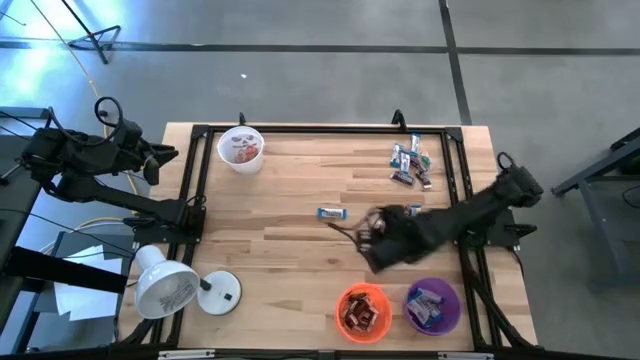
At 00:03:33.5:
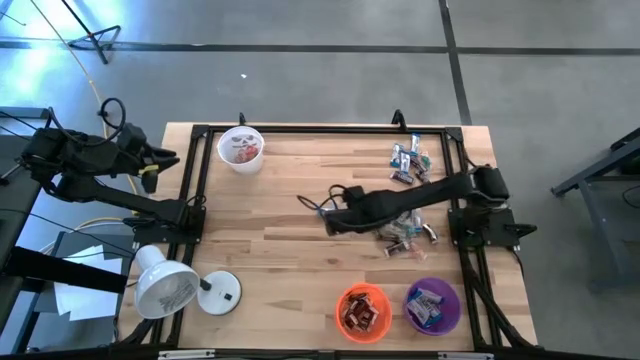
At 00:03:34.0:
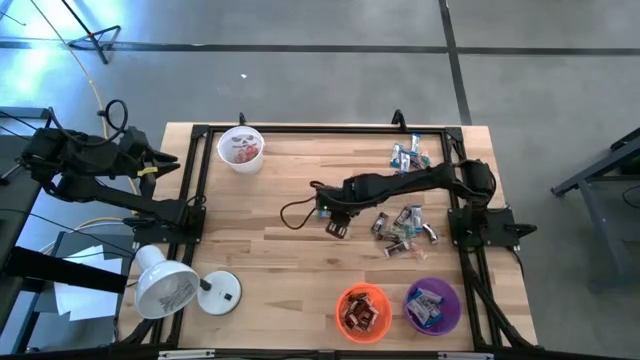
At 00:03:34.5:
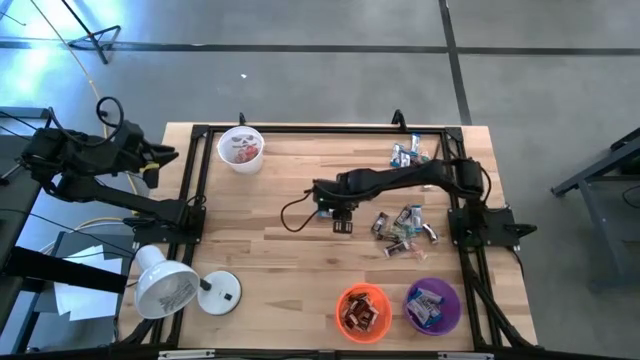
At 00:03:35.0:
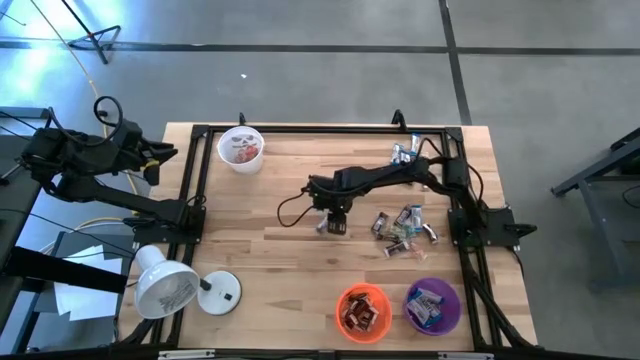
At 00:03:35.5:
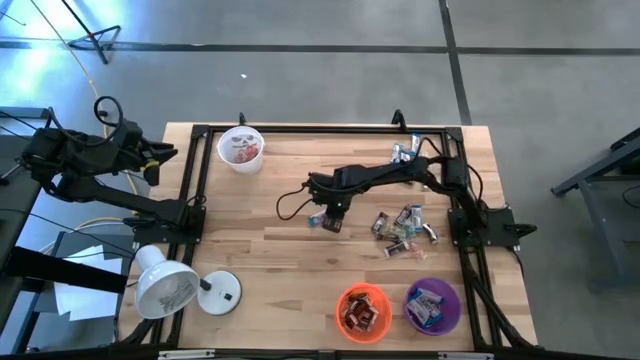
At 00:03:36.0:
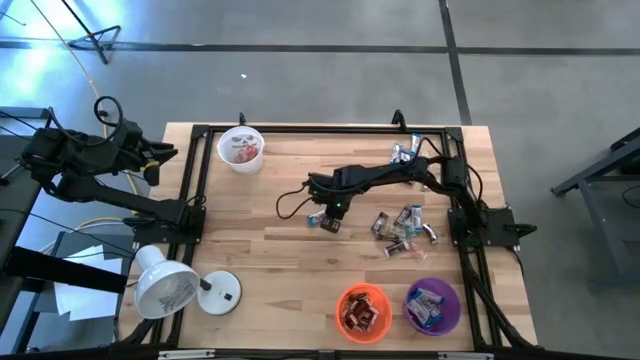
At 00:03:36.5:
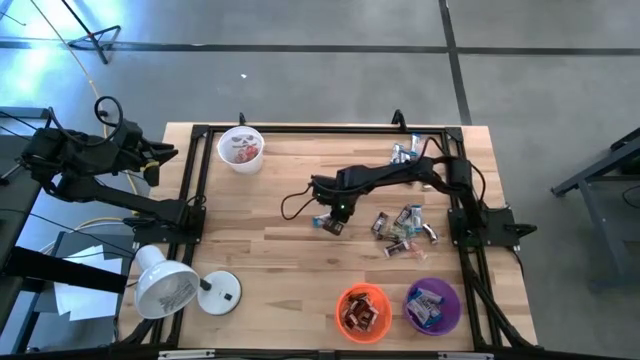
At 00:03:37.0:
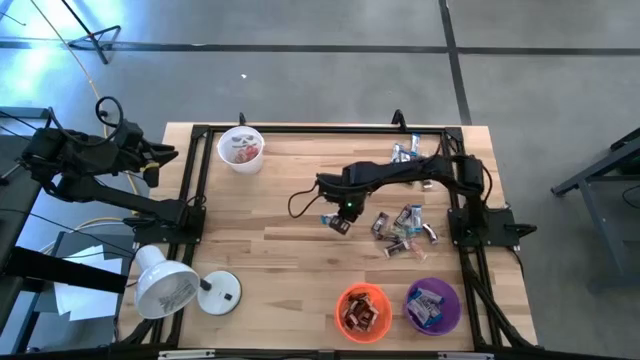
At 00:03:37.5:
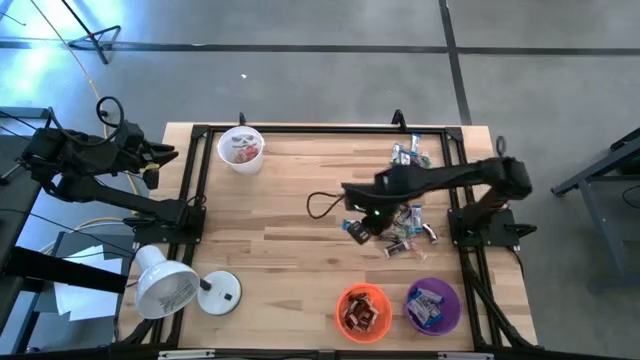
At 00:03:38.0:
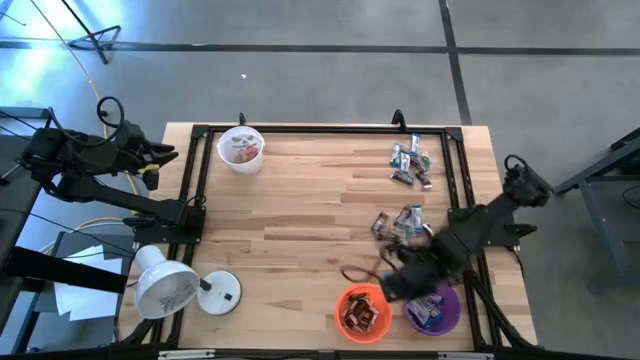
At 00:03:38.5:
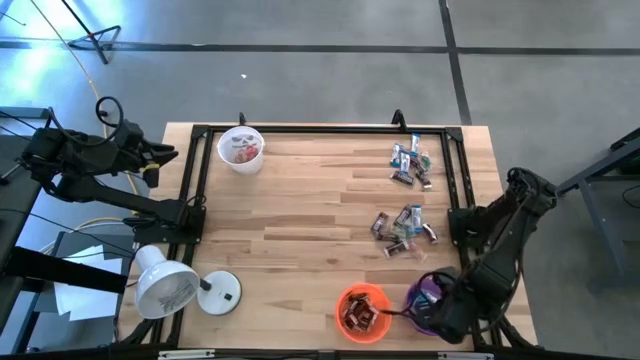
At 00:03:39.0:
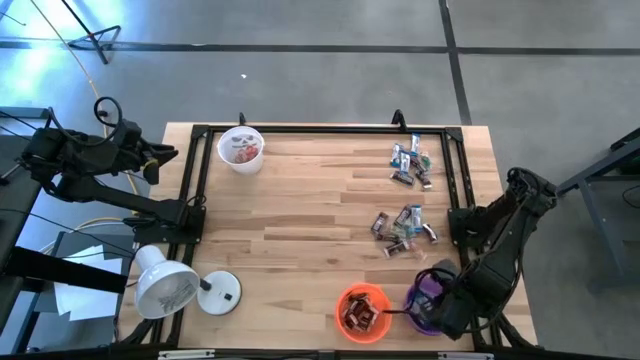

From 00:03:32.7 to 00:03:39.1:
Task: Organize candy in baskets
Put the white chocolate into the purple bucket

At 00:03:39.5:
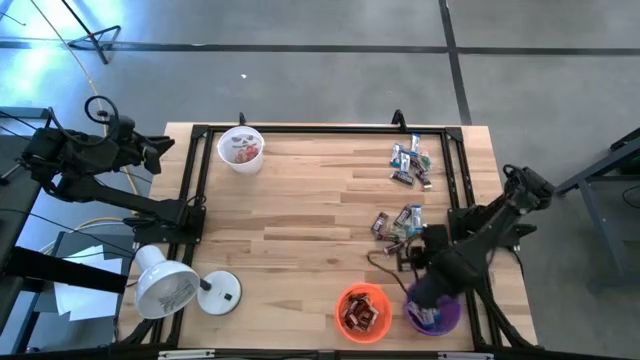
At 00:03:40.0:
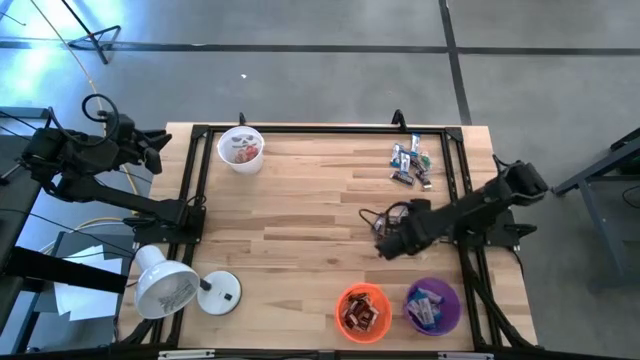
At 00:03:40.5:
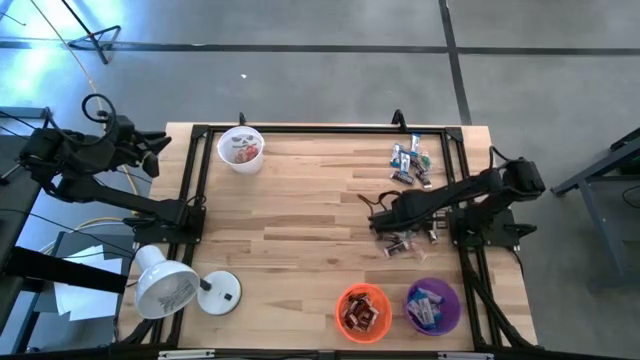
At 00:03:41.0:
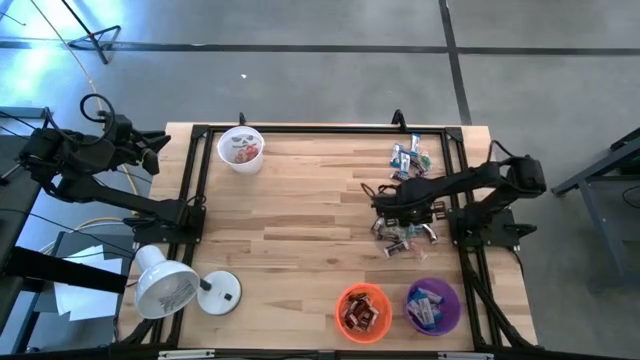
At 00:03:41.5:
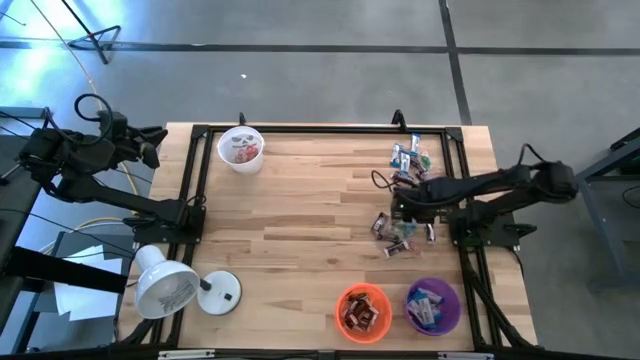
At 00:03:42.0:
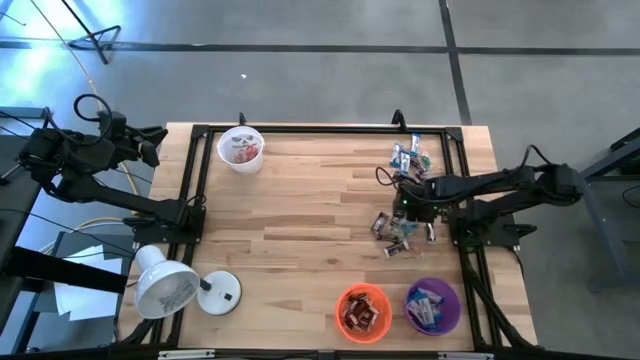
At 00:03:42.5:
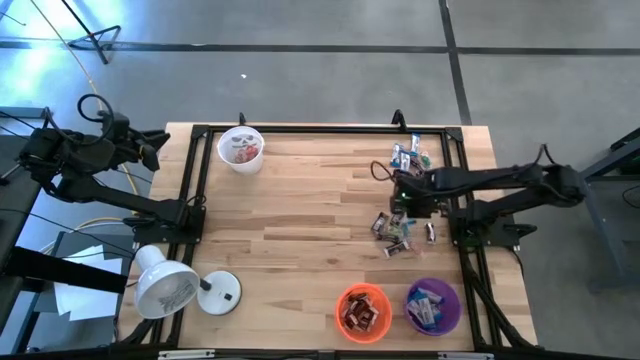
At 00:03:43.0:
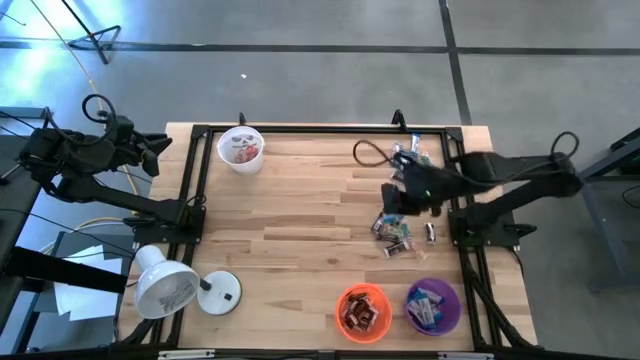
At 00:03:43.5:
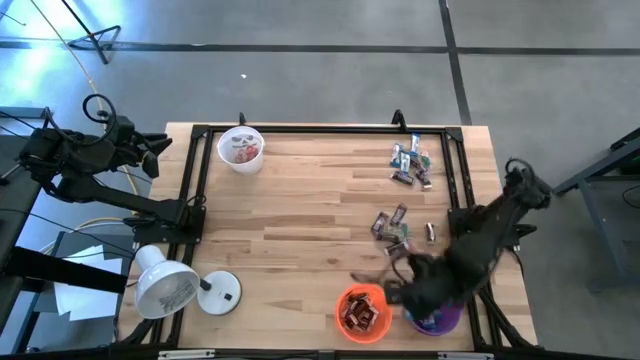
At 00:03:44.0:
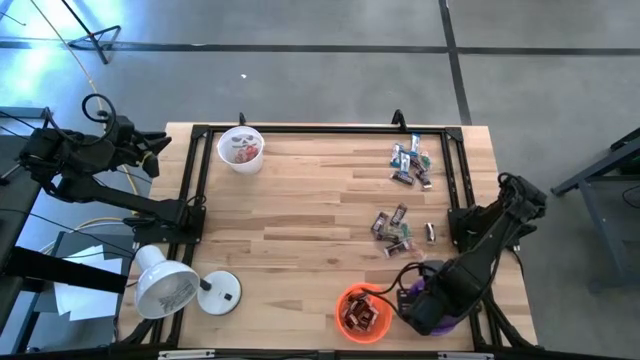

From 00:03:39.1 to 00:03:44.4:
Put the white chocolate into the purple bucket

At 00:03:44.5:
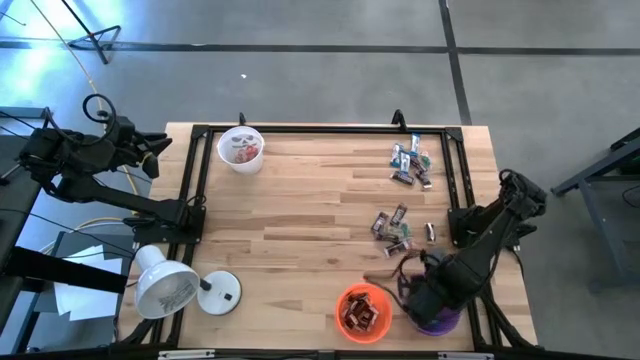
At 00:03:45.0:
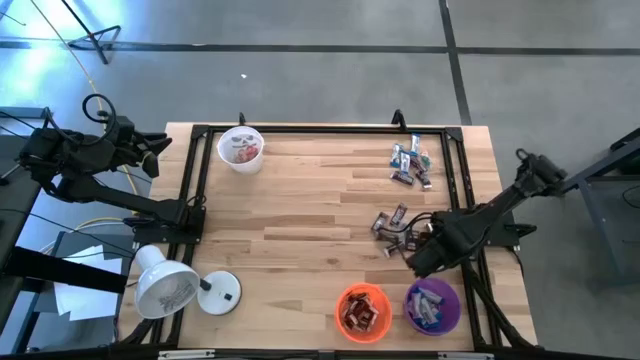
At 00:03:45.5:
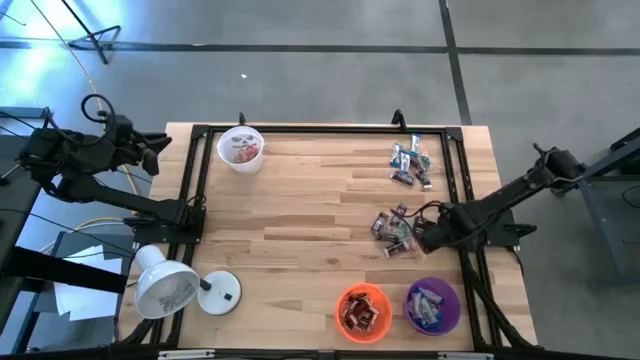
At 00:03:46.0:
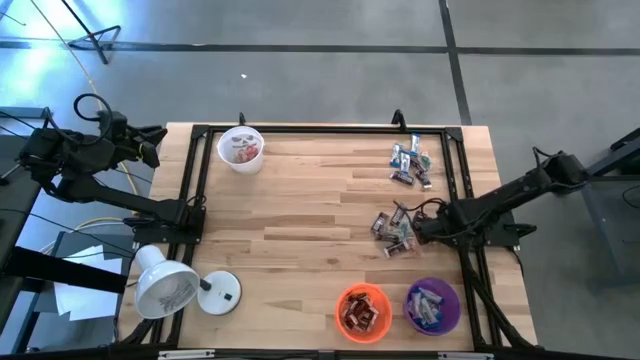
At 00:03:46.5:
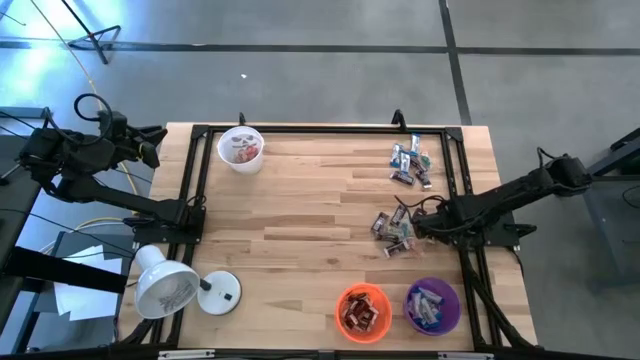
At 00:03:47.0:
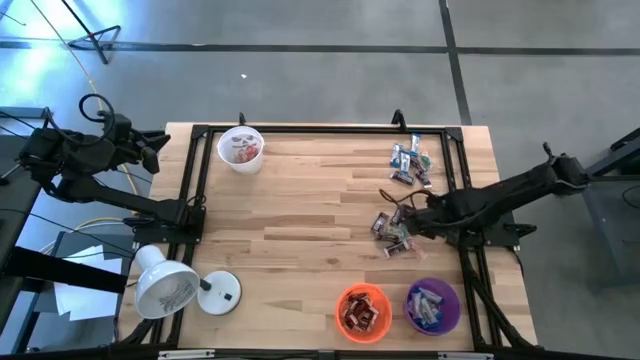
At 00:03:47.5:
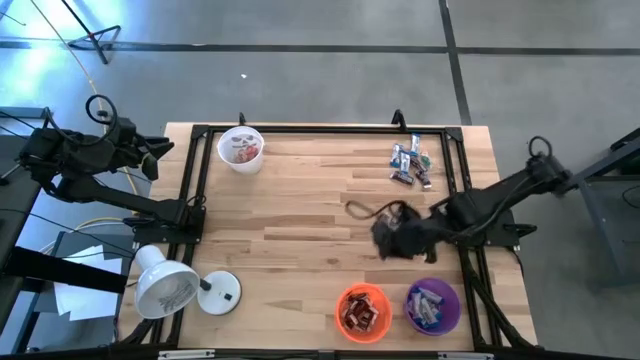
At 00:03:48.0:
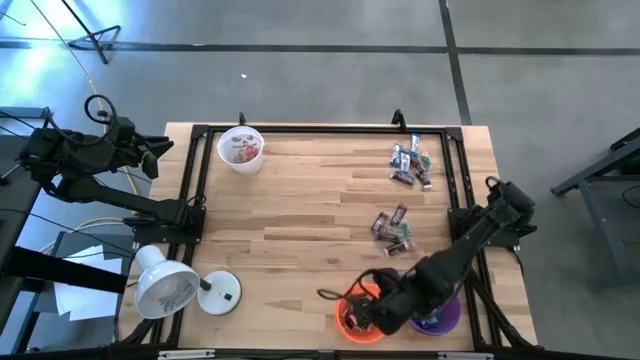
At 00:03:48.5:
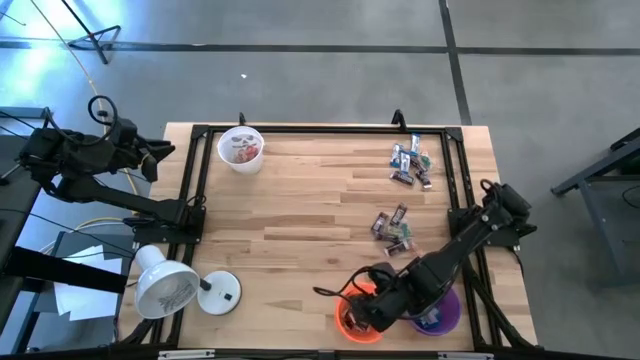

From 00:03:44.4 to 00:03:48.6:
Put the brown chocolate into the orange bucket

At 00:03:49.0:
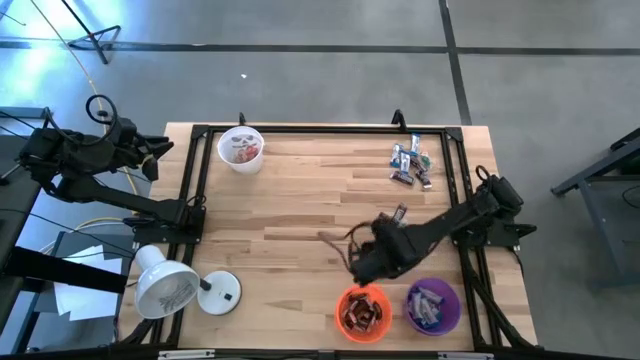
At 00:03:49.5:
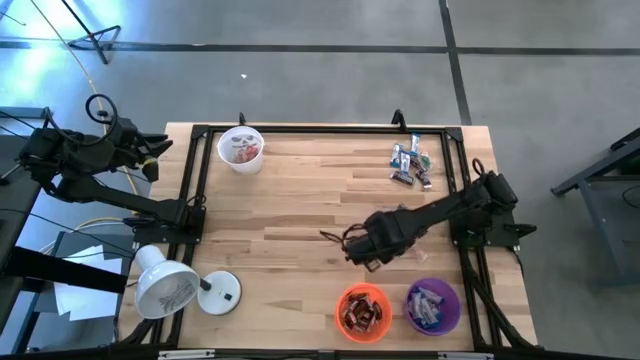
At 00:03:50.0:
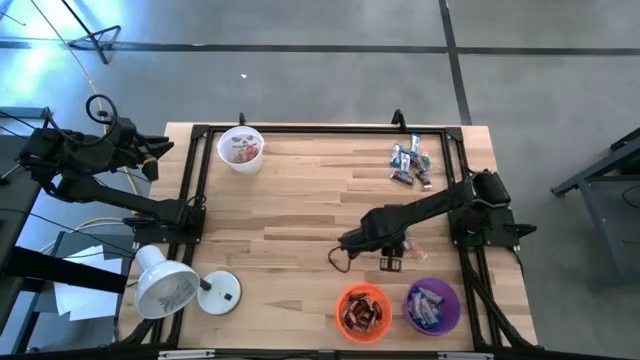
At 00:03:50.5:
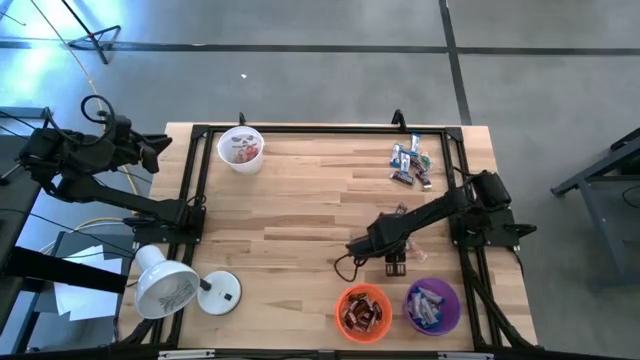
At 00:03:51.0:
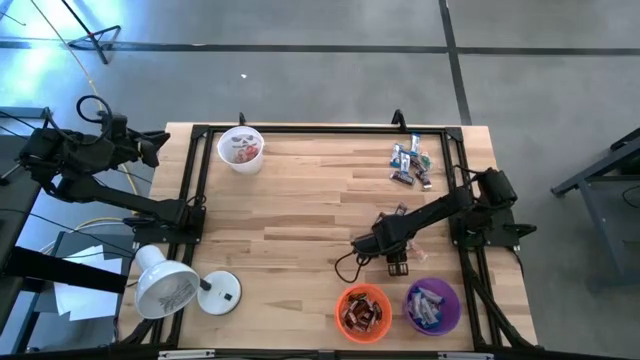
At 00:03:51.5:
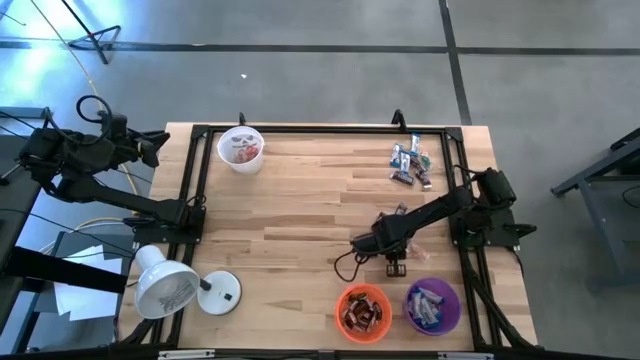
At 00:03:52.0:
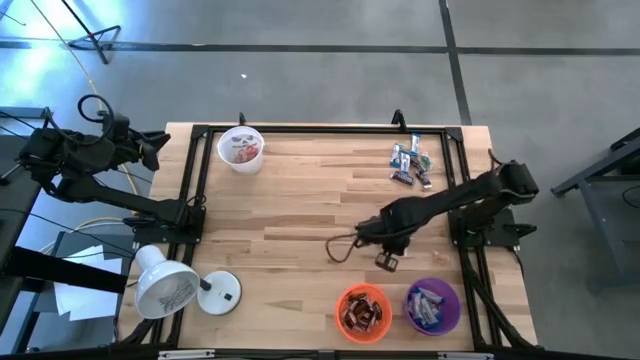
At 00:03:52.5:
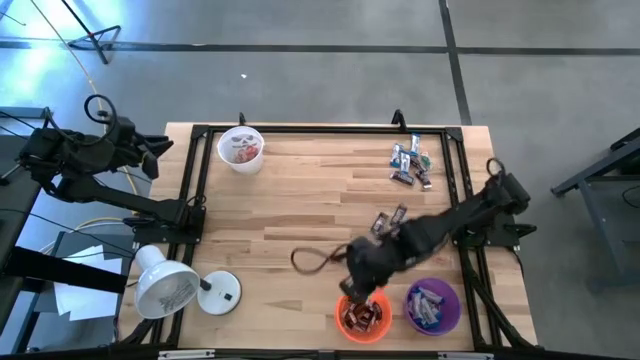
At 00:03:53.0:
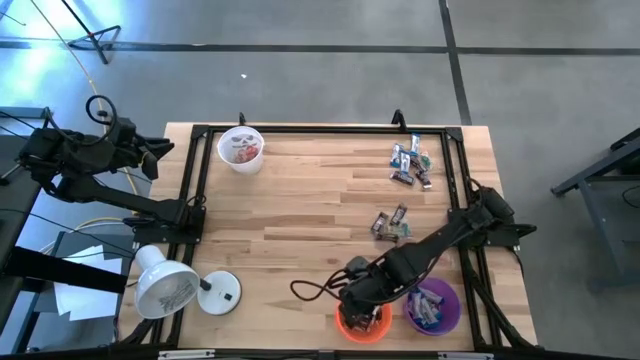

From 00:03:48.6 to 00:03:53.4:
Put the brown chocolate into the orange bucket

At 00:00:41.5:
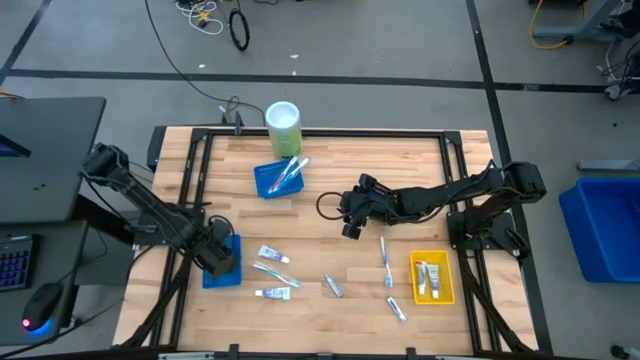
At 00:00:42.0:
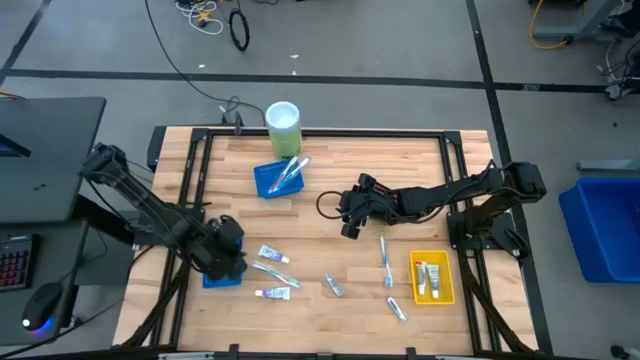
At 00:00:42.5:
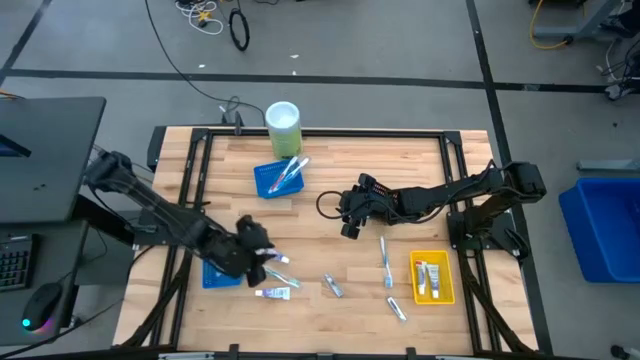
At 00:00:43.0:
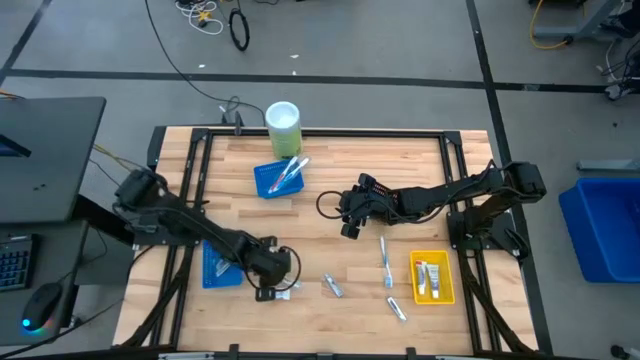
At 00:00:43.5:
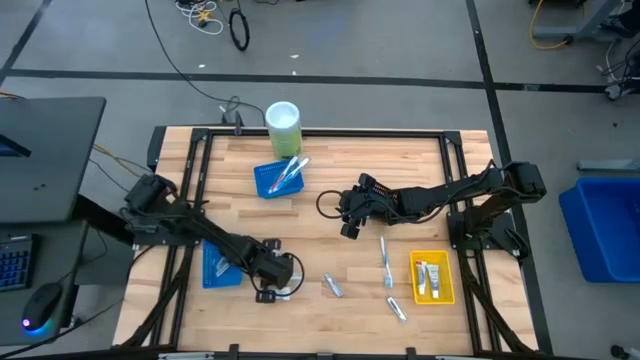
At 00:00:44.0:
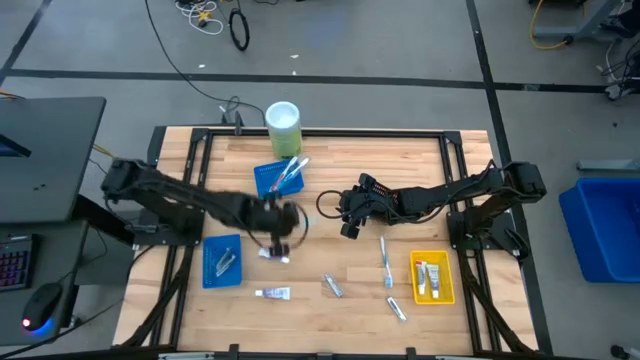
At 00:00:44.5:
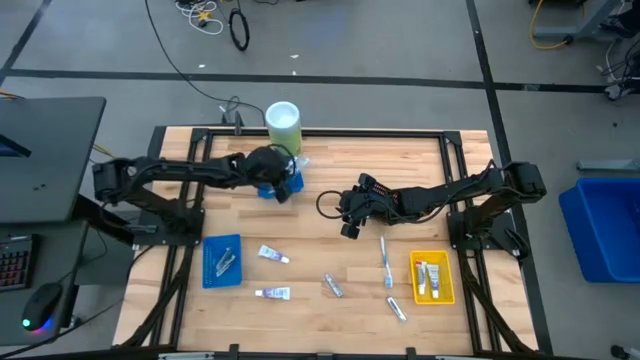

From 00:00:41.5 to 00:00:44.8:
Task: Pick & Place Travel size toiletries
Put the green toothbrush into the top blue bin
